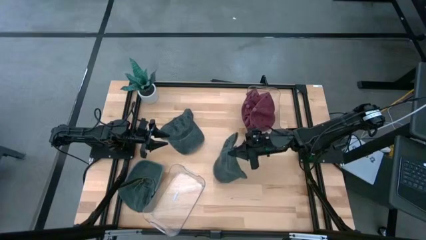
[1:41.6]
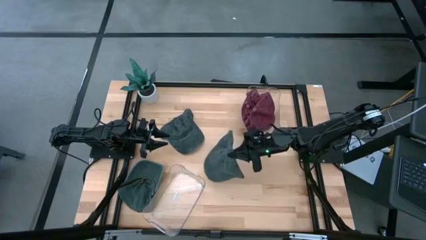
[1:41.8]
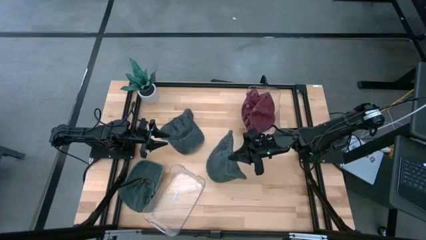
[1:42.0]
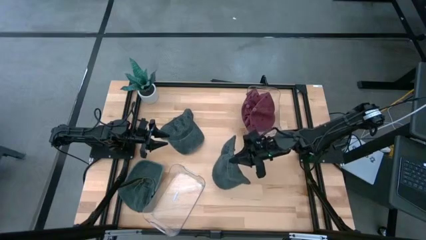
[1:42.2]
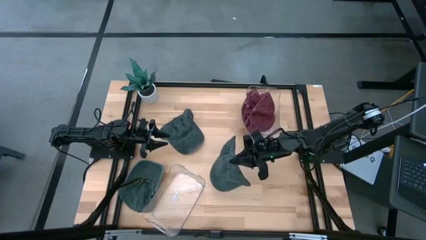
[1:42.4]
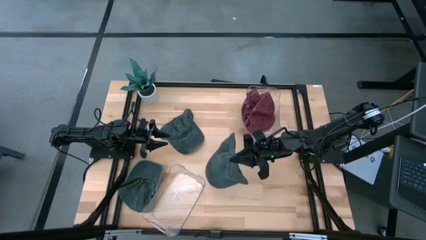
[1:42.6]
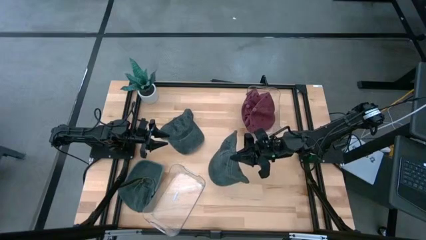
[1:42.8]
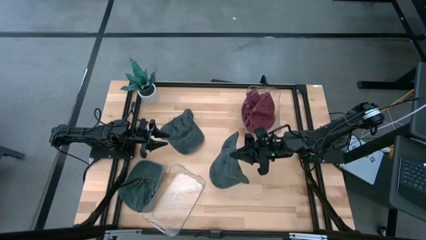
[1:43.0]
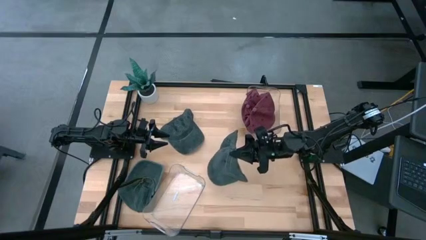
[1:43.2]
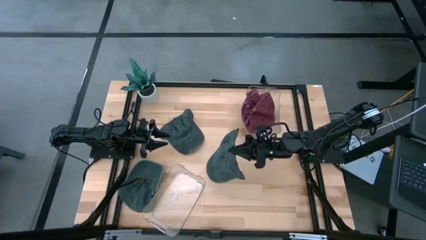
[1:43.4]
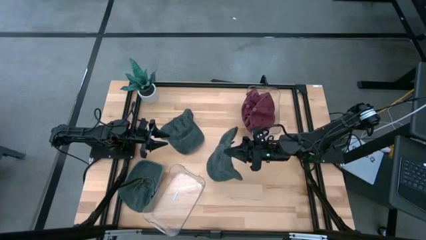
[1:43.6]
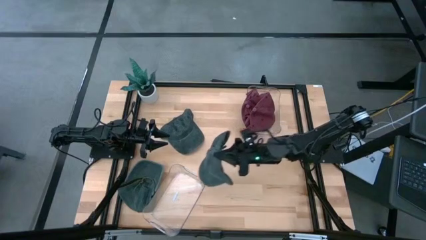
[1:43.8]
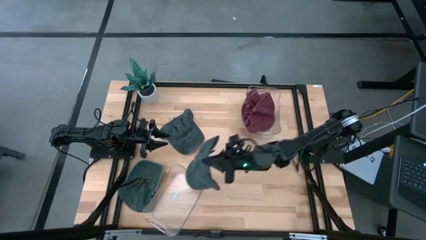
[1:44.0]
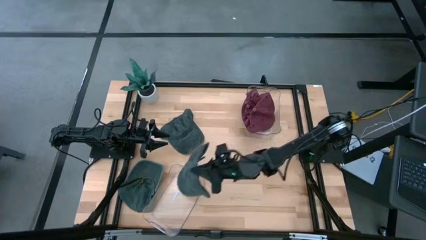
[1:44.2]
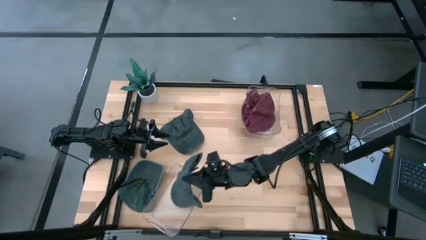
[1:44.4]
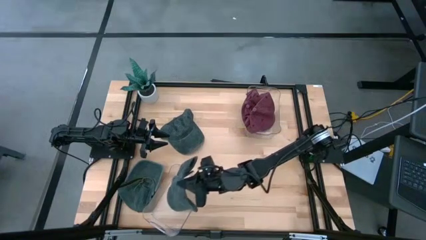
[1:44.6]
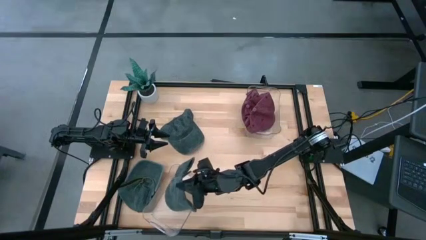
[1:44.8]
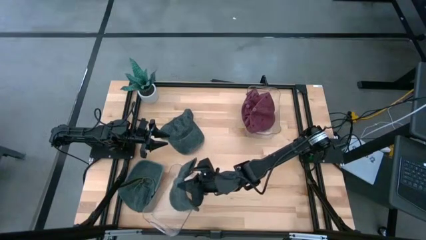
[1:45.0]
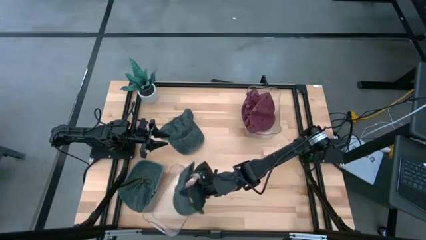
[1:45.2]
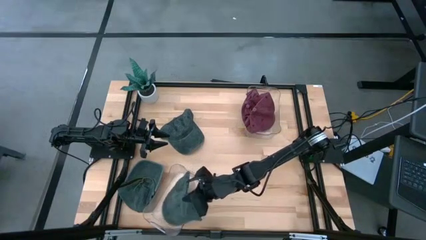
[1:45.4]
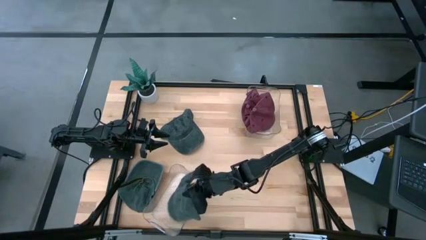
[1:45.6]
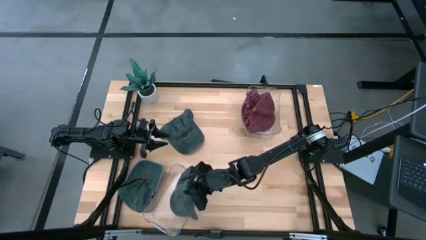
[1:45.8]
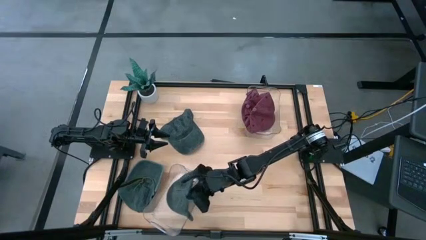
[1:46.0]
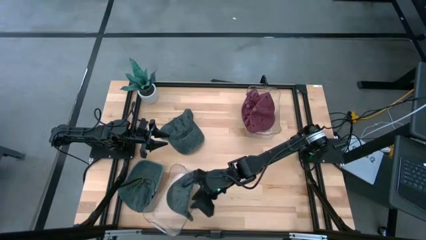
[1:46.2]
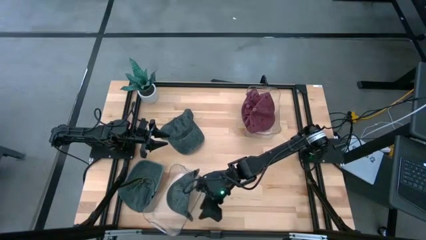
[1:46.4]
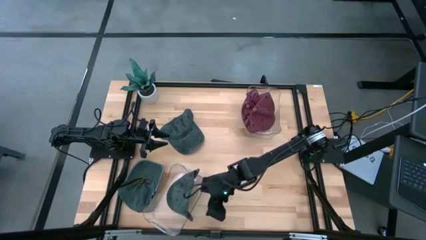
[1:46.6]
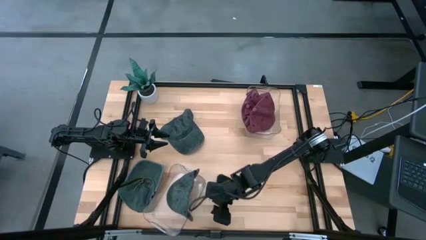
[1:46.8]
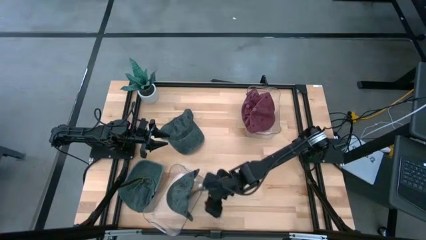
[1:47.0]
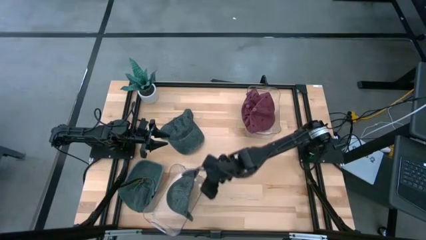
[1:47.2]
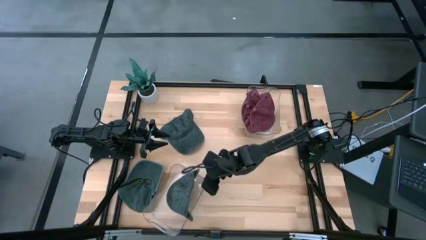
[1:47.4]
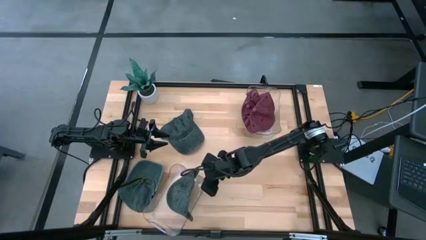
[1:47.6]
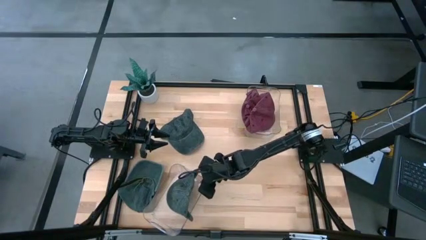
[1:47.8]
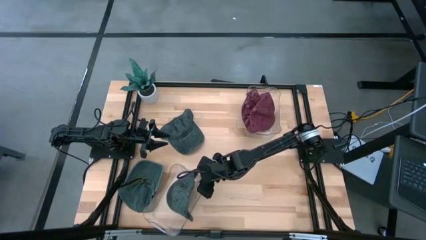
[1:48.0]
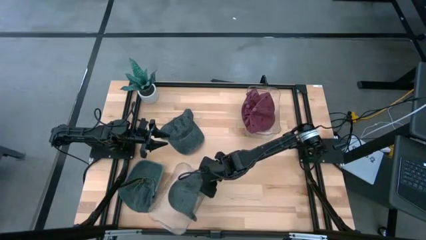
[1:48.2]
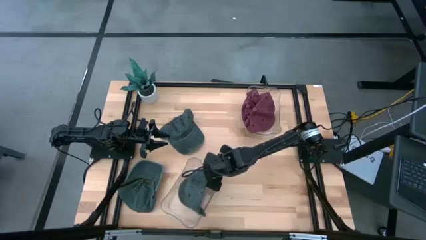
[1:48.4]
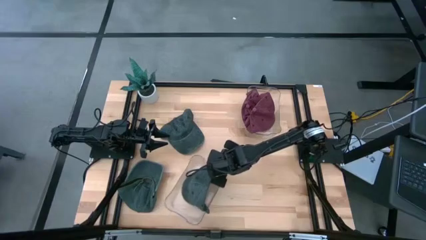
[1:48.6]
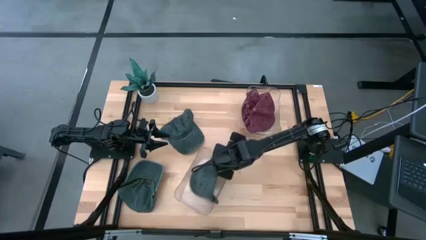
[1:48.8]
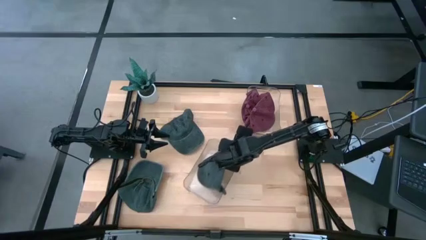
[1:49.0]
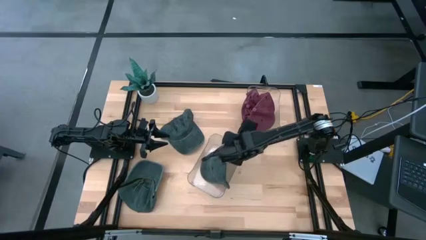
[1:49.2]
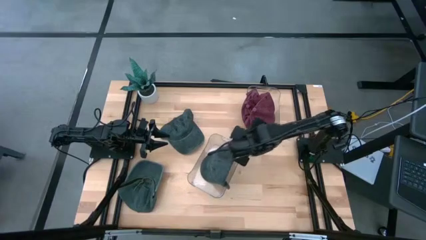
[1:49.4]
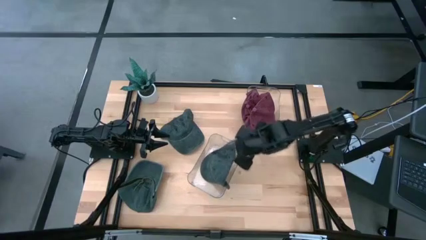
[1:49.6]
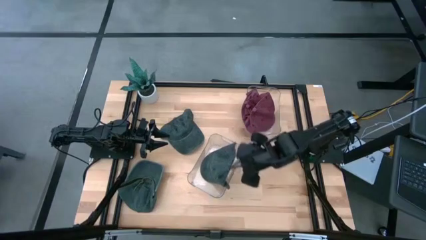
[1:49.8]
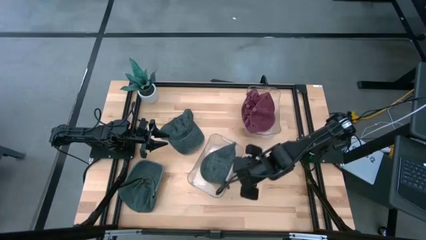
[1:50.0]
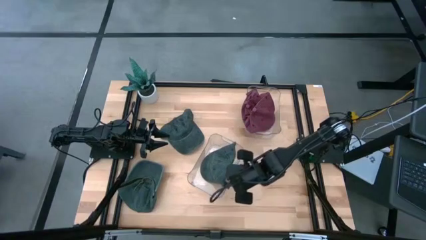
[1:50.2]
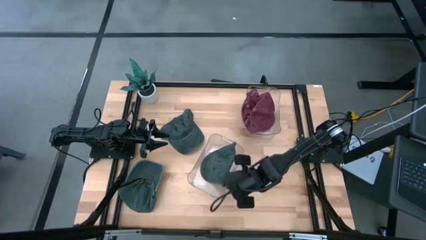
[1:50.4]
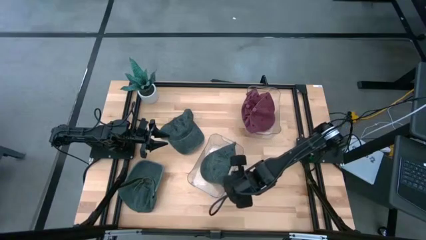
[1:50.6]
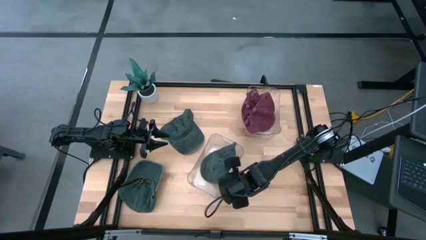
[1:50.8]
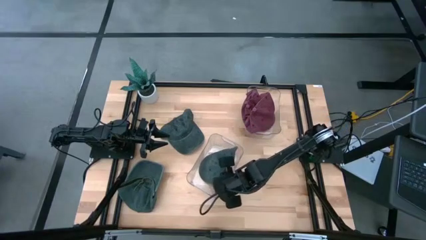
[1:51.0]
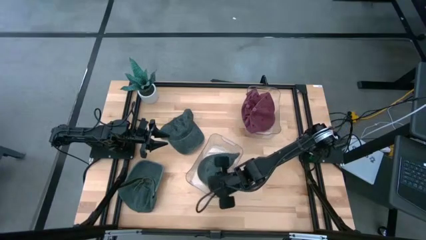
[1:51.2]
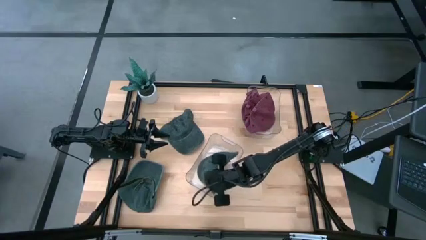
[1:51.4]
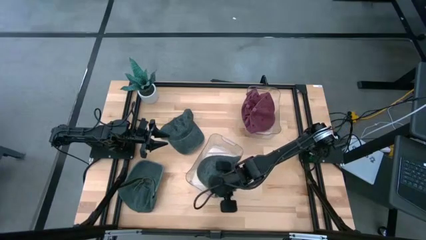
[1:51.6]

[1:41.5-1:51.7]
Task: Pick & Place hat
Put the top right black cap into the bottom transparent bin

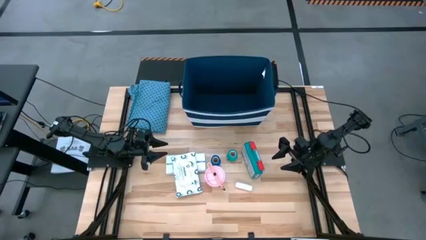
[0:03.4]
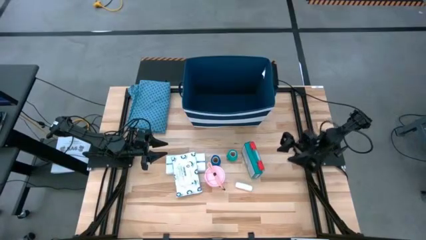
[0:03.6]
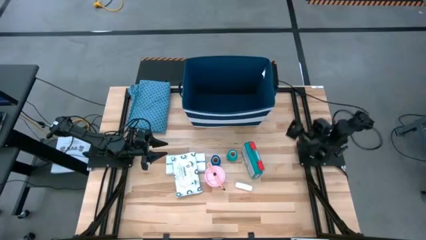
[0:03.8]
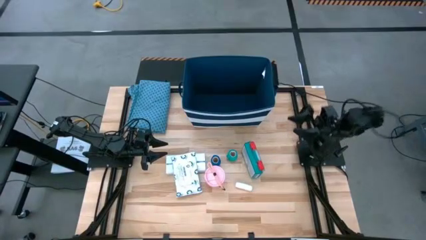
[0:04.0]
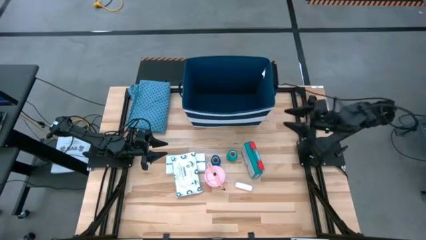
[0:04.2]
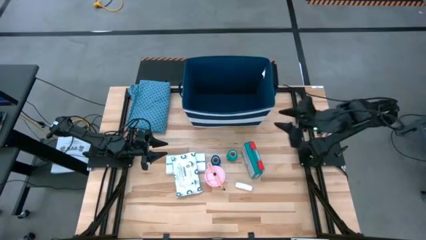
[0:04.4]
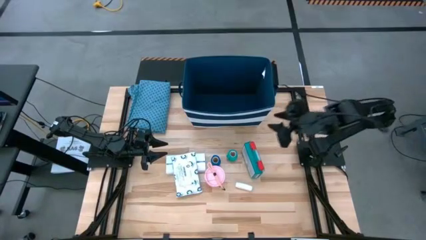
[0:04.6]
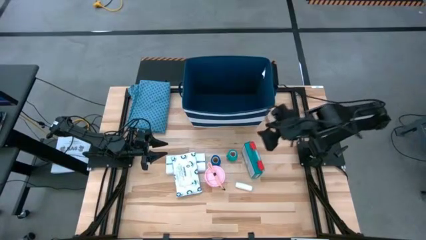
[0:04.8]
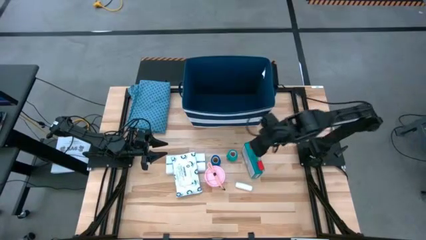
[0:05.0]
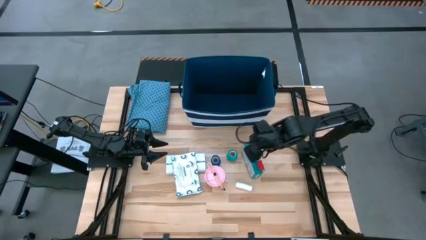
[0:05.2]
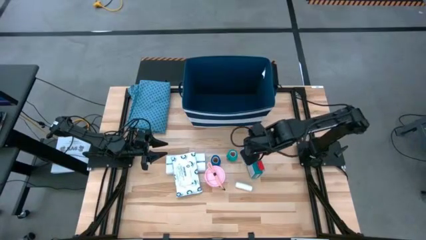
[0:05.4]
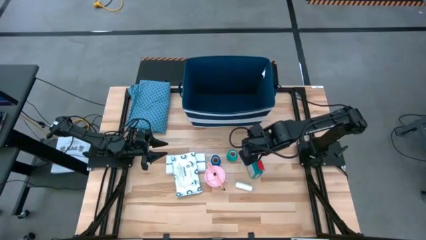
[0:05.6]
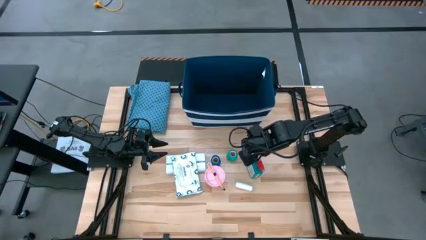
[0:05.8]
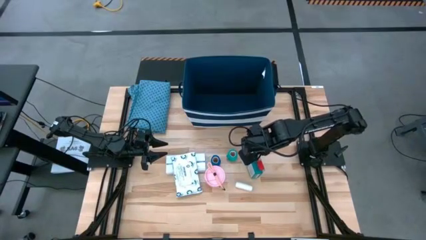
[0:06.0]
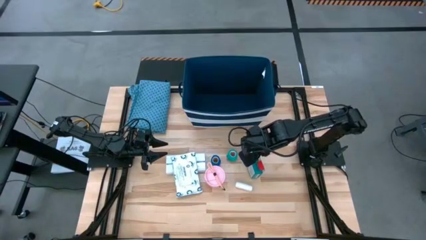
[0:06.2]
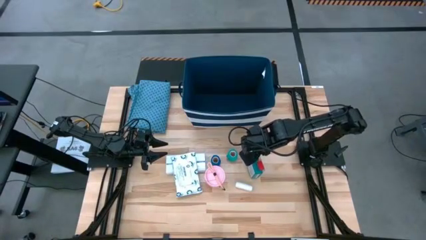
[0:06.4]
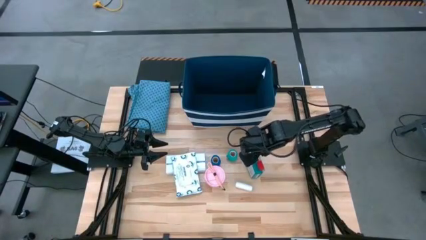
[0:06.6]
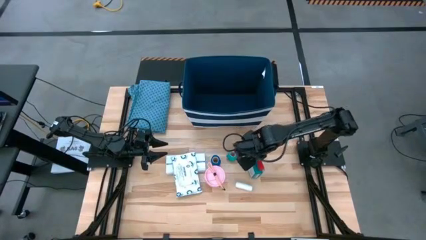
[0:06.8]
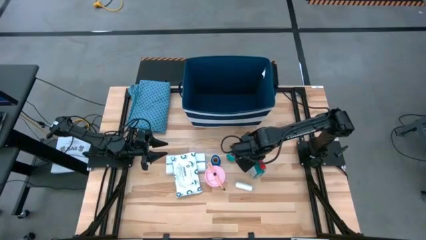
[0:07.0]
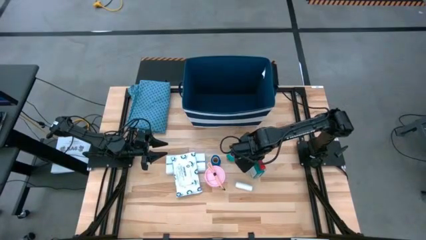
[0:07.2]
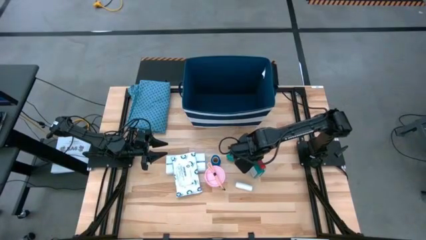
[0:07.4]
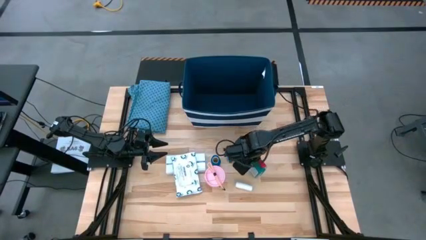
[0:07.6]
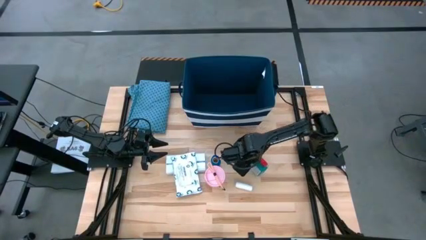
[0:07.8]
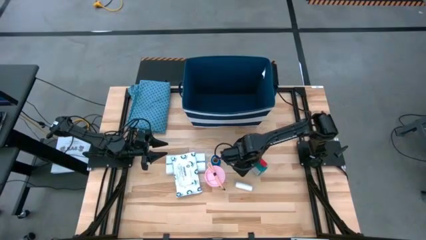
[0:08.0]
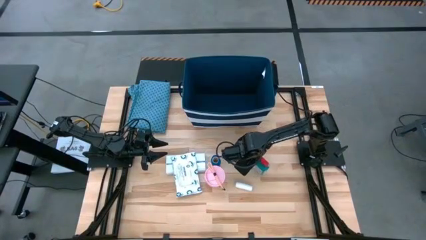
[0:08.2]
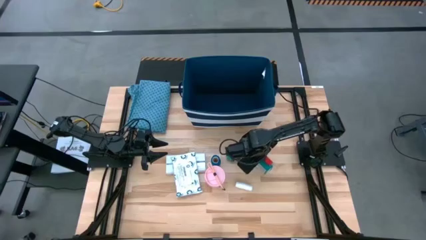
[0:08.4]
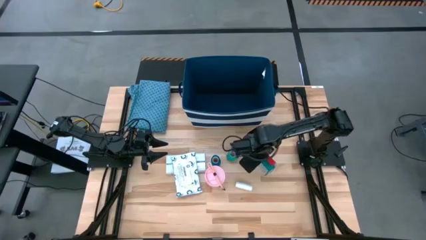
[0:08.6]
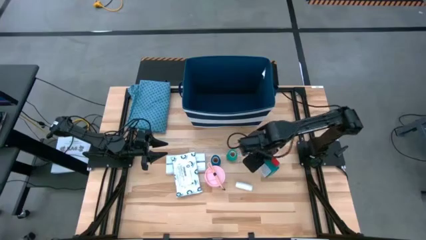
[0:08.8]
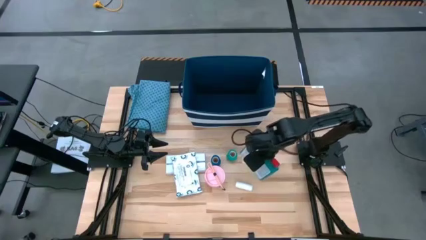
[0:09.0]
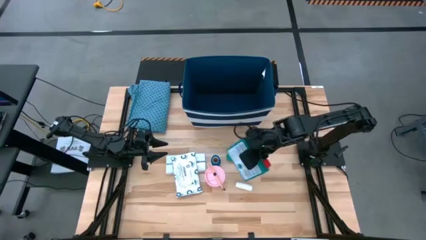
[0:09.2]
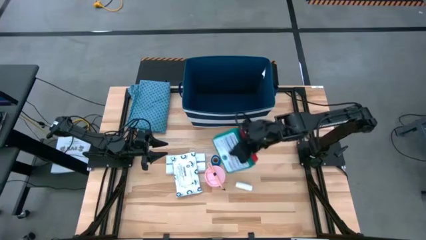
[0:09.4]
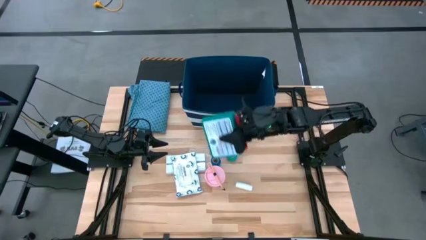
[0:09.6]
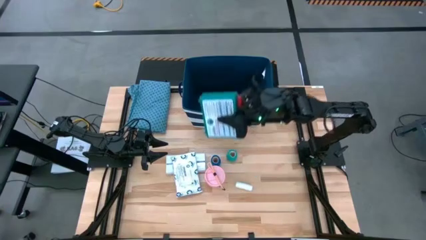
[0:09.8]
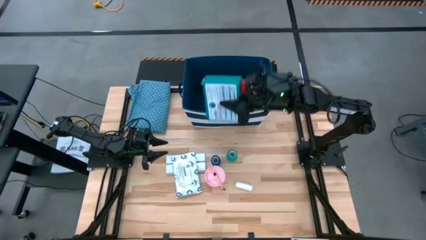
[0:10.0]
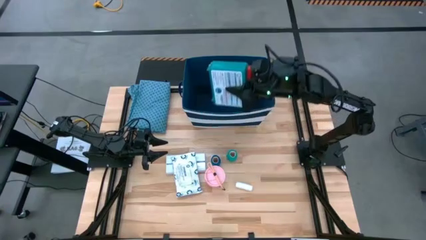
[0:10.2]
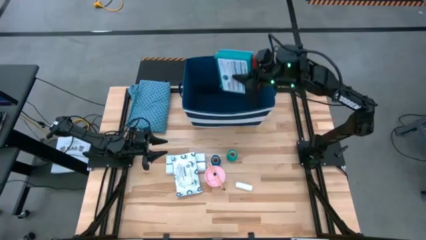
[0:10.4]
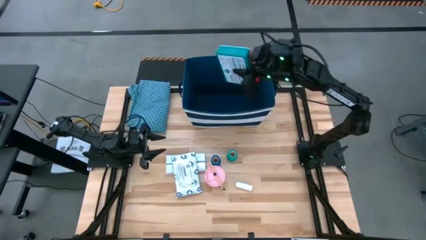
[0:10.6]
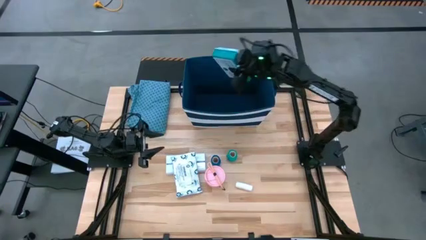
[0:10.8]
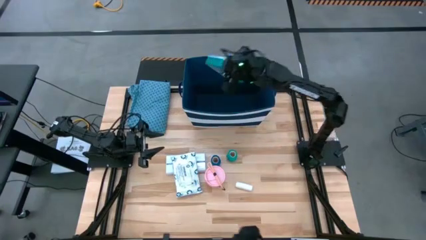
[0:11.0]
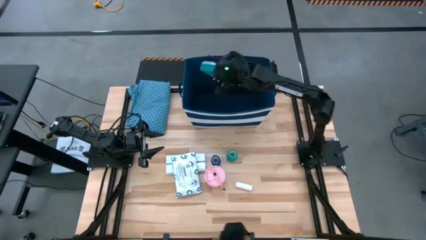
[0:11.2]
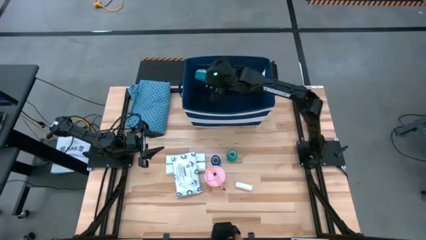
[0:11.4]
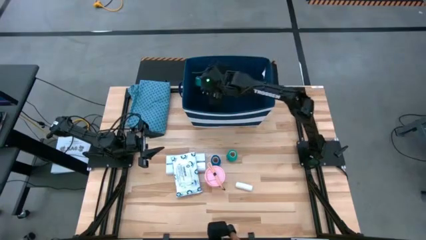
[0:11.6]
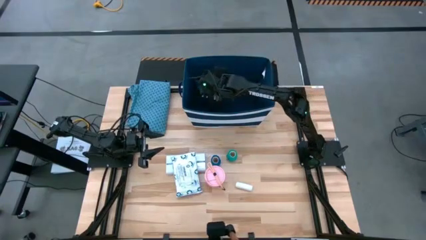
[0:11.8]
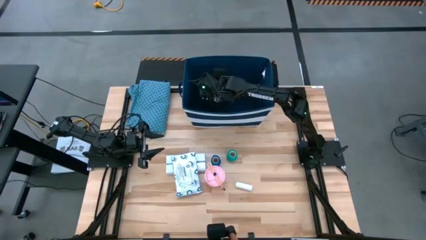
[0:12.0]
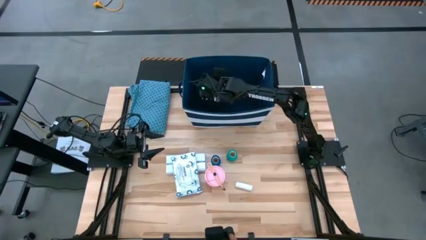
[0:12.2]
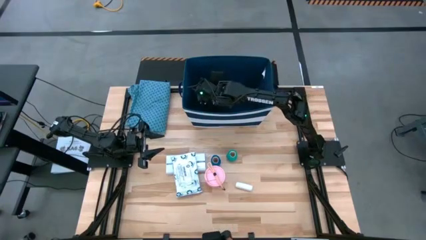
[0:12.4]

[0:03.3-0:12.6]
Task: Pick & place medical supplies in basket/bin
Put the green first aid kit into the blue bin
